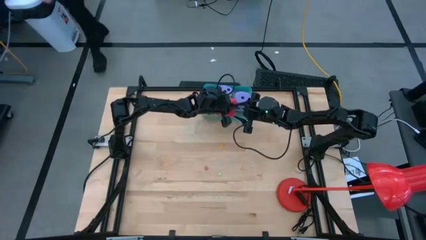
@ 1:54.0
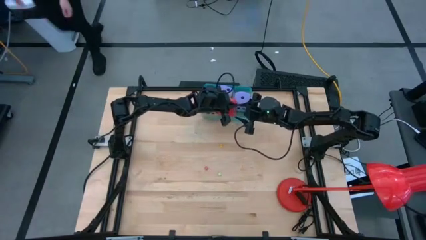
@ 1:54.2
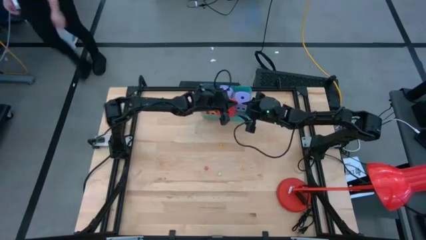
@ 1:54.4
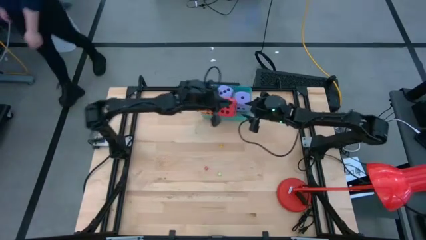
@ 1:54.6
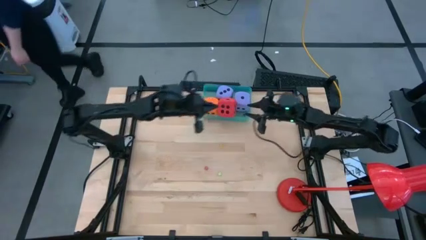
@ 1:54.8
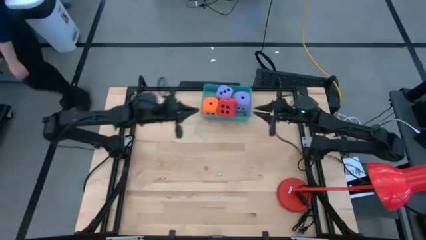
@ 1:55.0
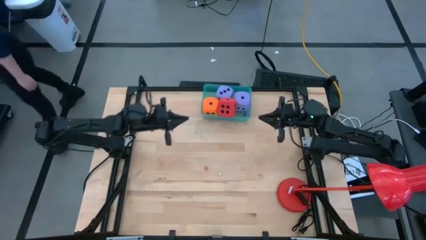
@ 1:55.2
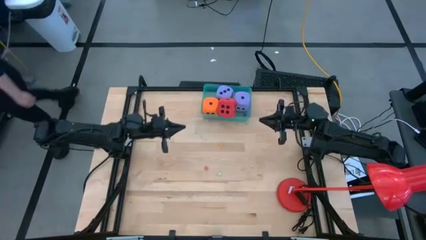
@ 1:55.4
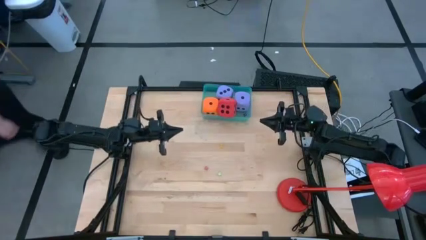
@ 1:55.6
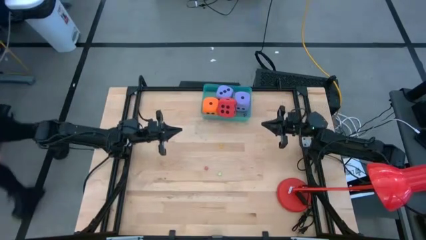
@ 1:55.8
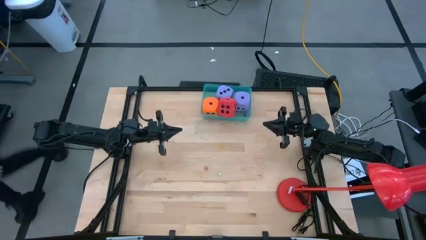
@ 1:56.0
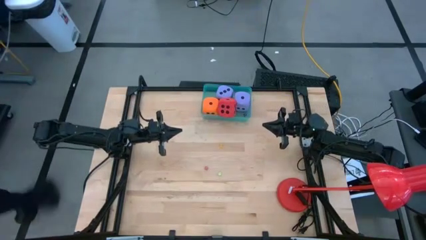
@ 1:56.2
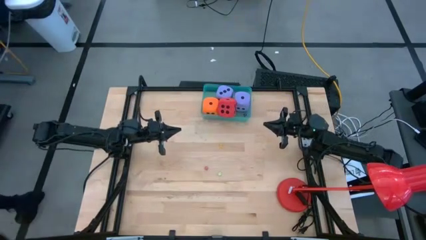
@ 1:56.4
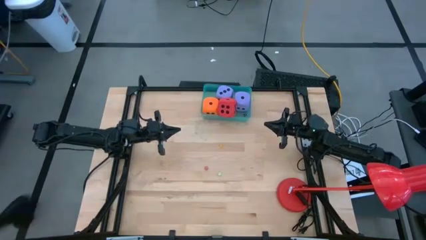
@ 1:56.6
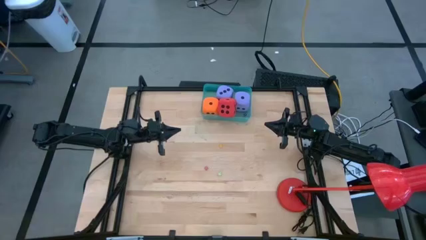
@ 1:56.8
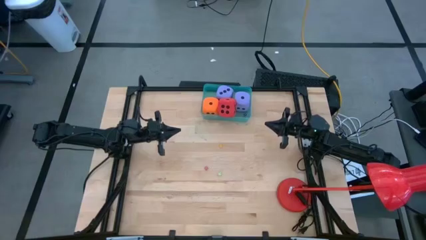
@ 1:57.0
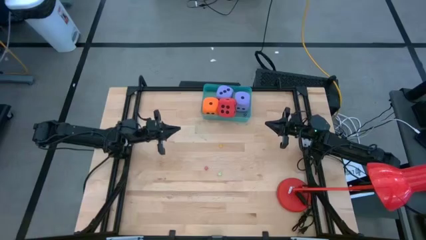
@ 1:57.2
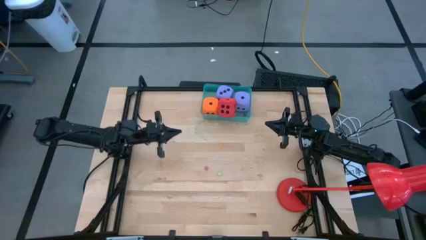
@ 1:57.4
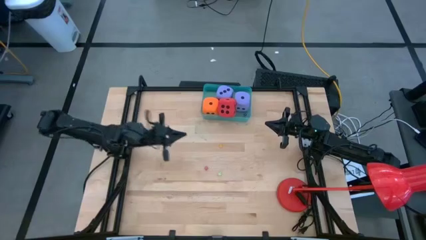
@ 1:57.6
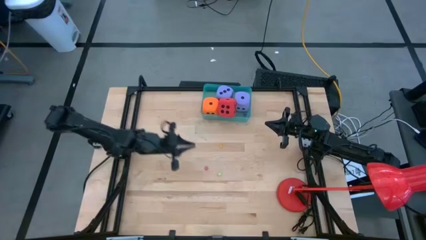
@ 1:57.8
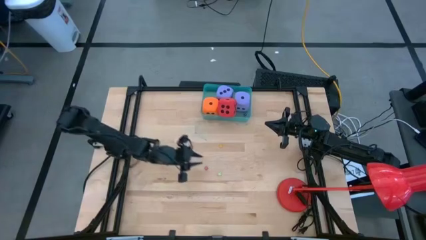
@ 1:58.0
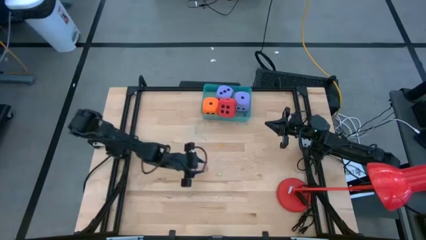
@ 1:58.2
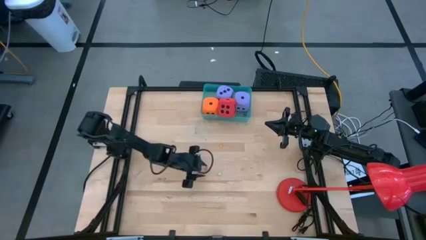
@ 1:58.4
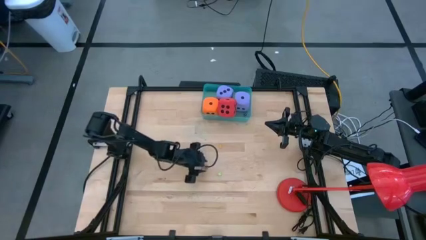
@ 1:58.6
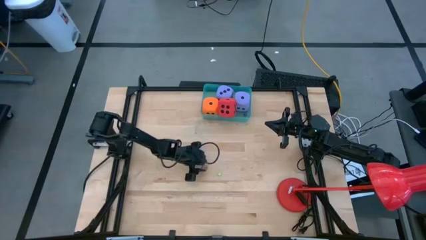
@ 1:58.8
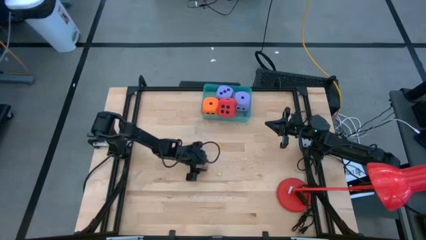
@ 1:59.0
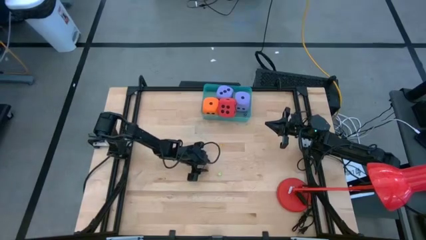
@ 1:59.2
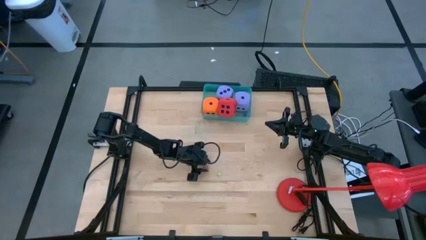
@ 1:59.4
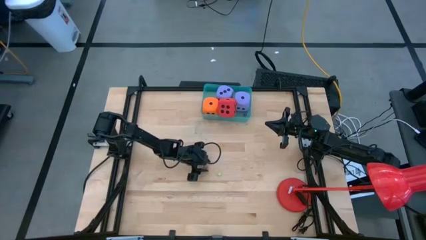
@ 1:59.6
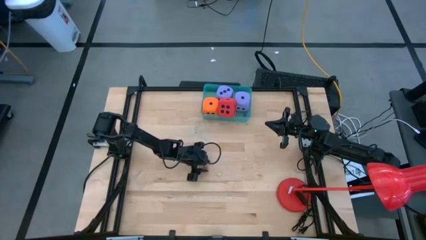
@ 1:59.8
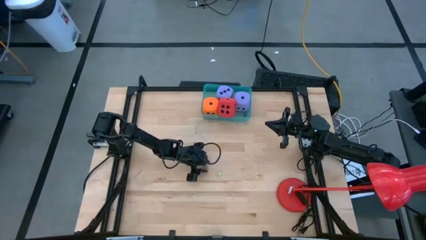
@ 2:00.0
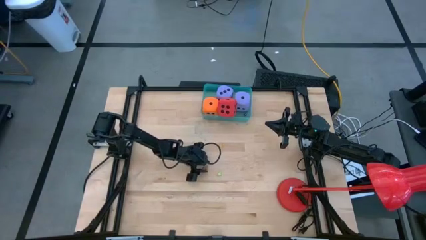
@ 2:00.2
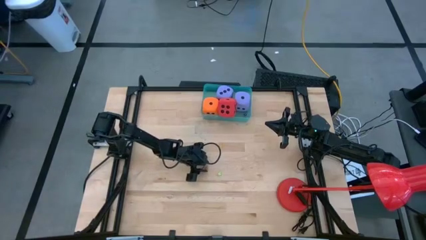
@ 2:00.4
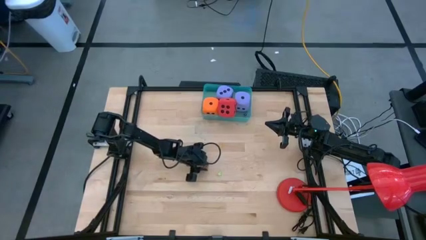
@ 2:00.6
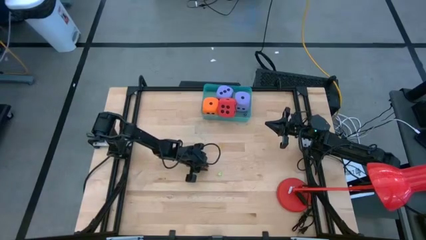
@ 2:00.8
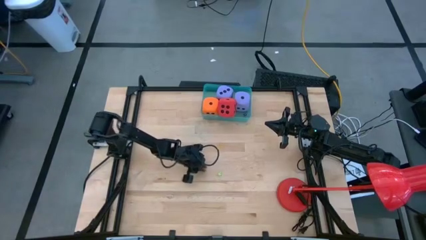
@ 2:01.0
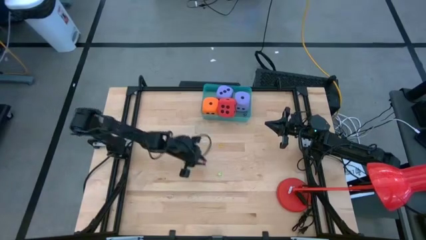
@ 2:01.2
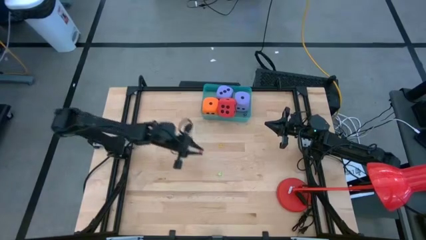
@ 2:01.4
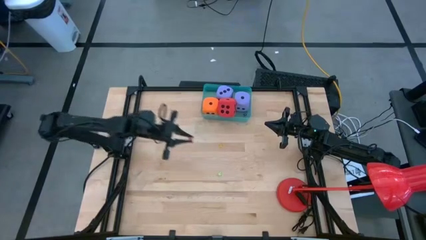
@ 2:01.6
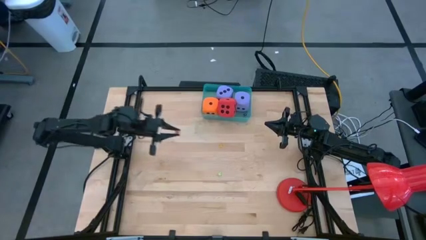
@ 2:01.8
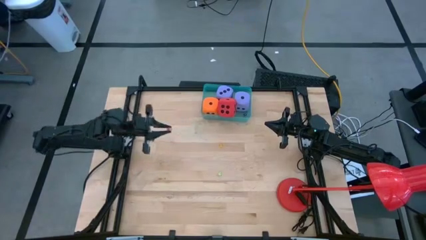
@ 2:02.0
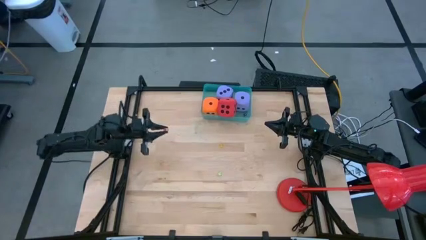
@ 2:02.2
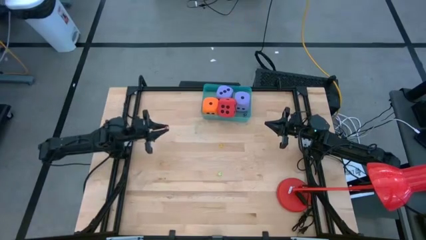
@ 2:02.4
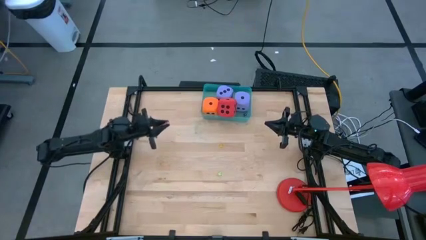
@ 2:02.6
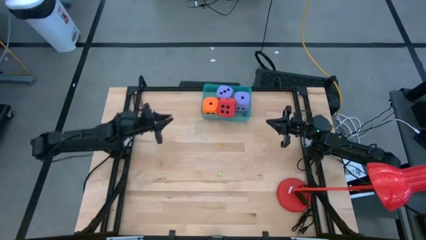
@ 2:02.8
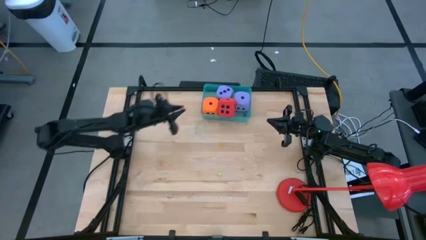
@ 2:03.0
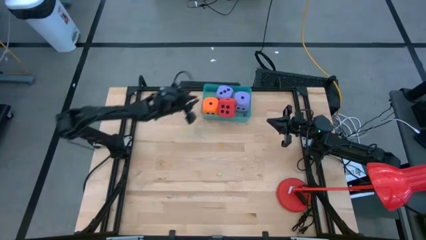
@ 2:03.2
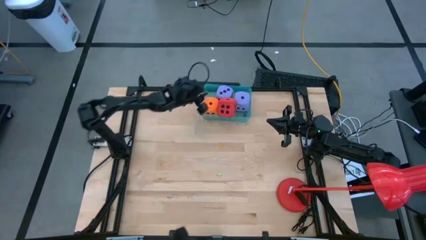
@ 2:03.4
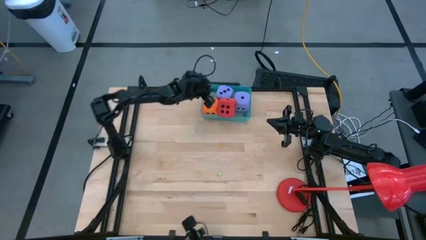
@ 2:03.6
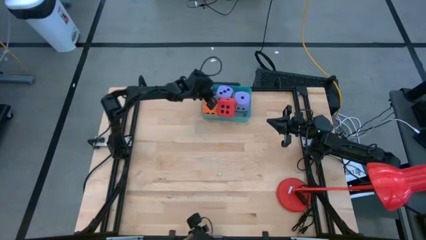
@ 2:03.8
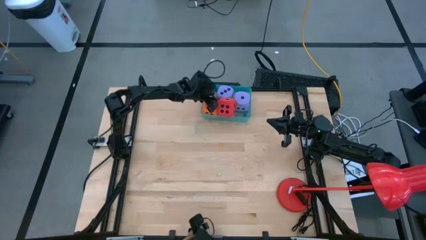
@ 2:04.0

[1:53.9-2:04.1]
Task: Pick & Place Dice
Put the small red dice into the blue transparent bin

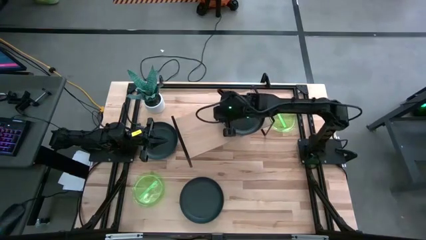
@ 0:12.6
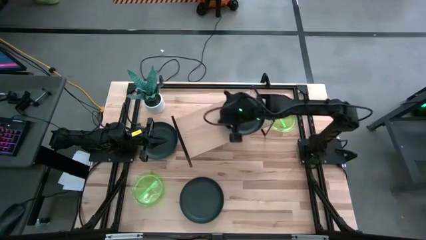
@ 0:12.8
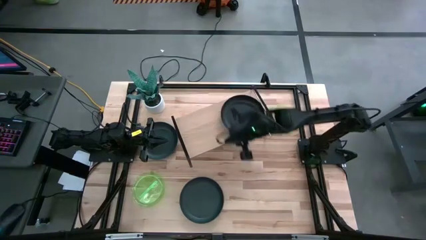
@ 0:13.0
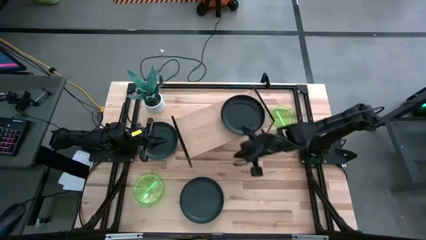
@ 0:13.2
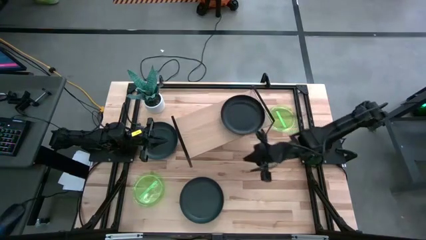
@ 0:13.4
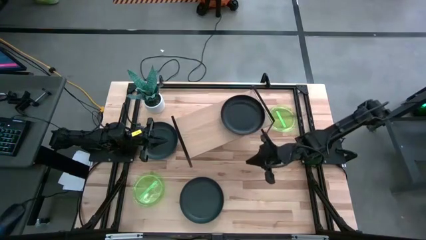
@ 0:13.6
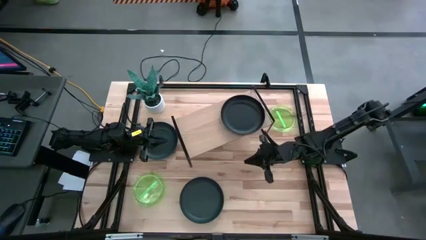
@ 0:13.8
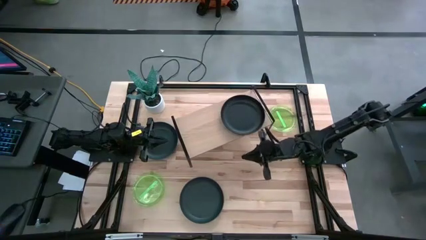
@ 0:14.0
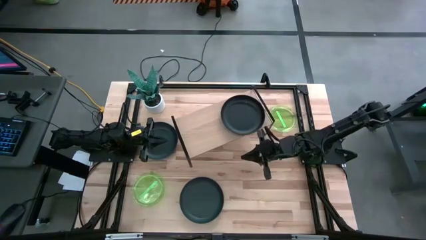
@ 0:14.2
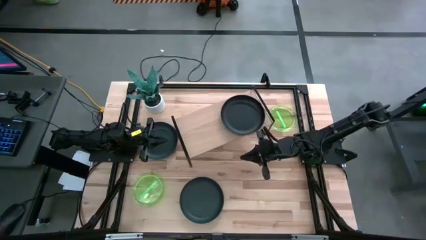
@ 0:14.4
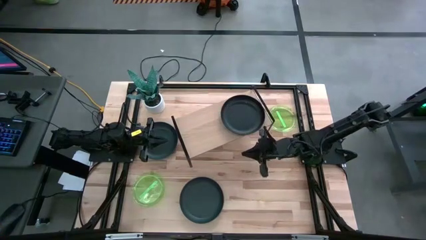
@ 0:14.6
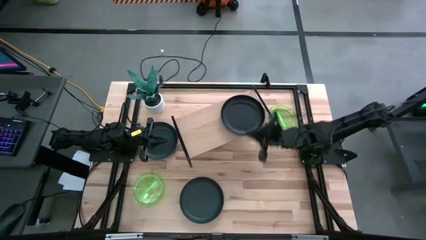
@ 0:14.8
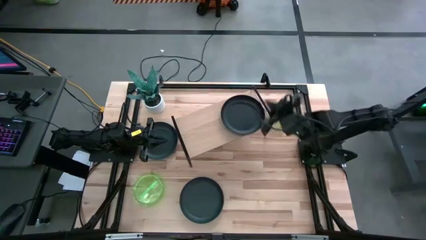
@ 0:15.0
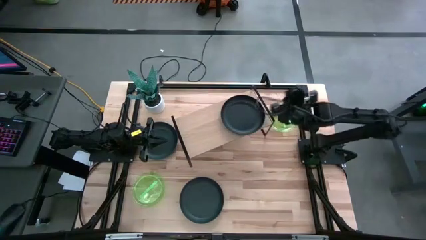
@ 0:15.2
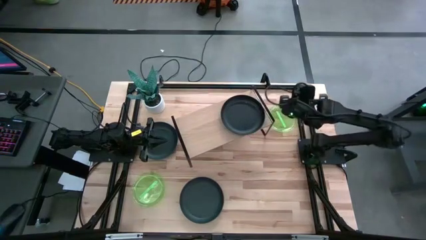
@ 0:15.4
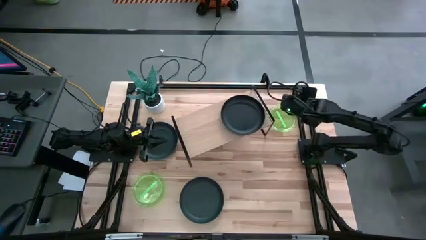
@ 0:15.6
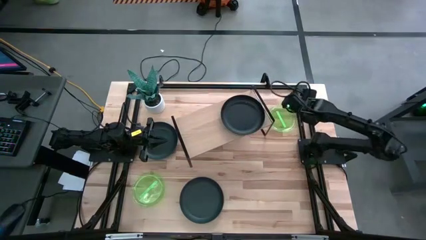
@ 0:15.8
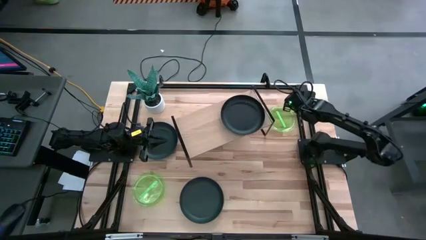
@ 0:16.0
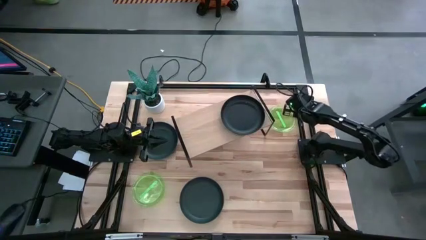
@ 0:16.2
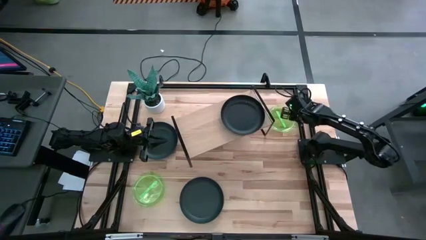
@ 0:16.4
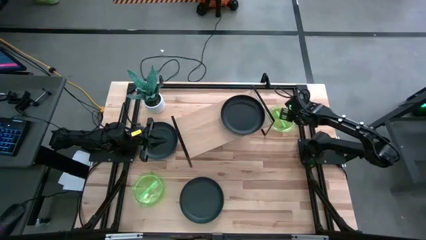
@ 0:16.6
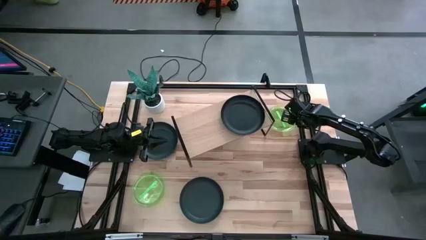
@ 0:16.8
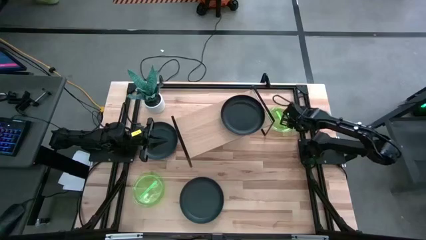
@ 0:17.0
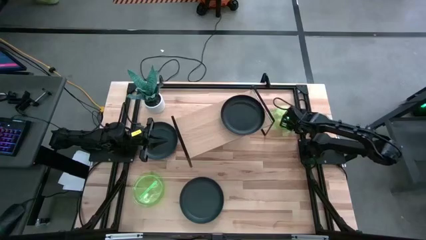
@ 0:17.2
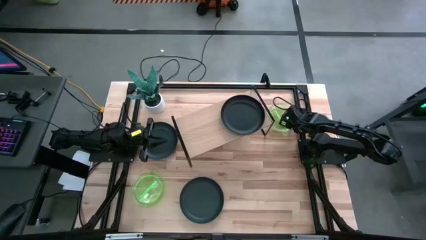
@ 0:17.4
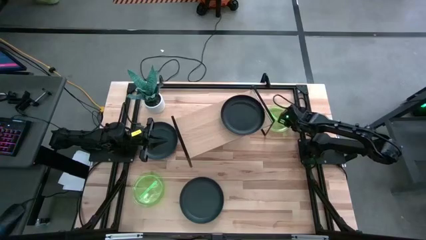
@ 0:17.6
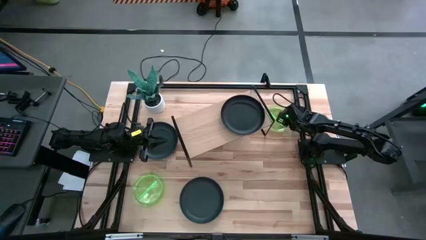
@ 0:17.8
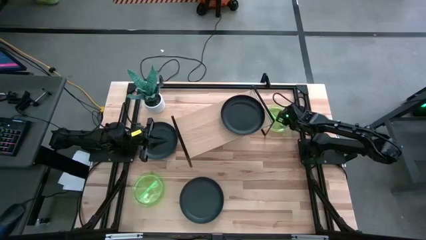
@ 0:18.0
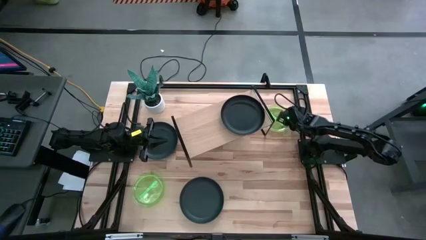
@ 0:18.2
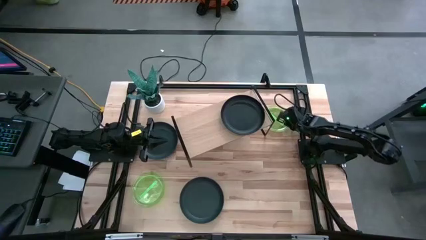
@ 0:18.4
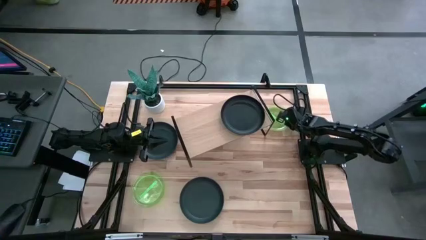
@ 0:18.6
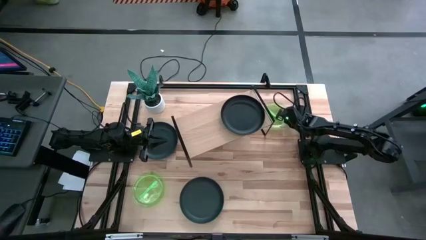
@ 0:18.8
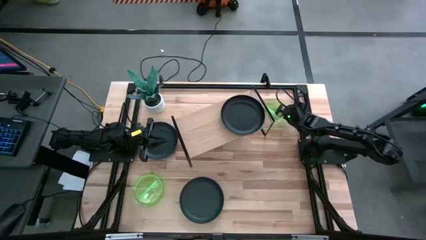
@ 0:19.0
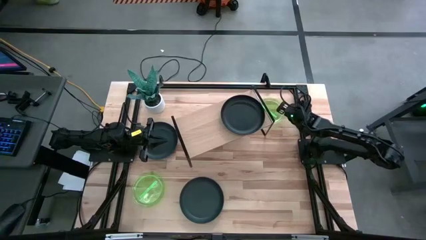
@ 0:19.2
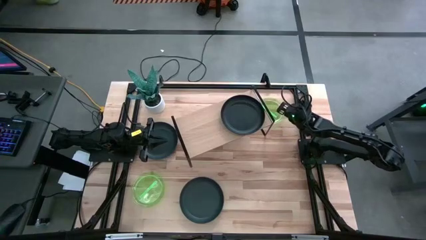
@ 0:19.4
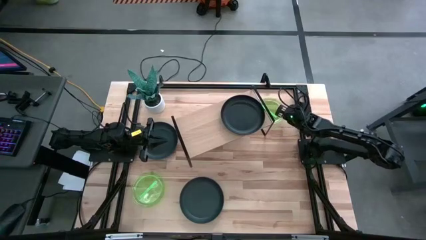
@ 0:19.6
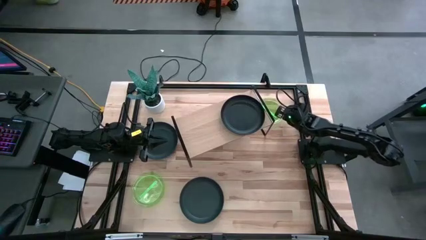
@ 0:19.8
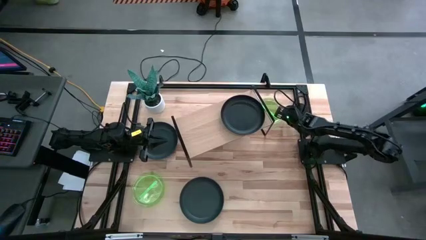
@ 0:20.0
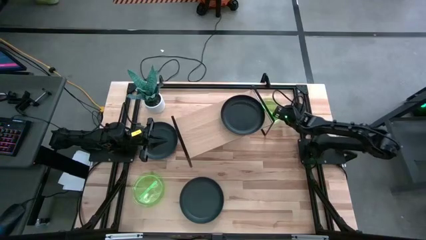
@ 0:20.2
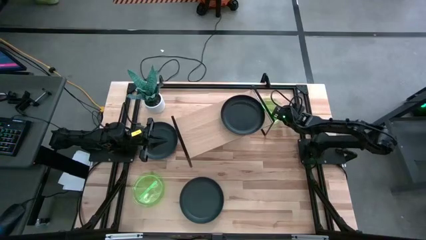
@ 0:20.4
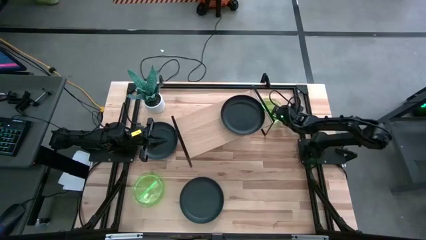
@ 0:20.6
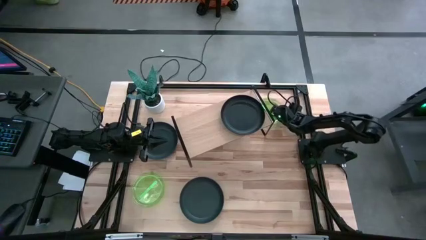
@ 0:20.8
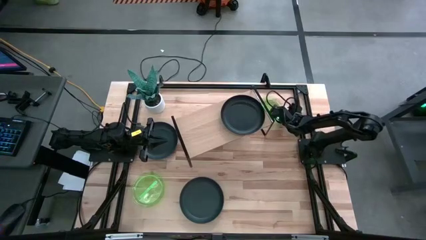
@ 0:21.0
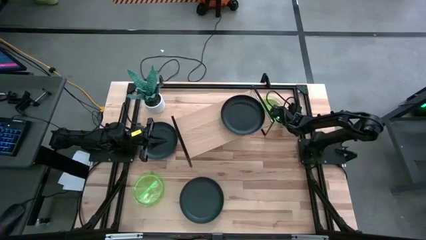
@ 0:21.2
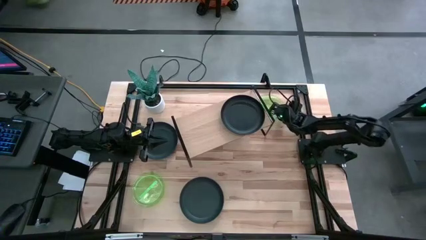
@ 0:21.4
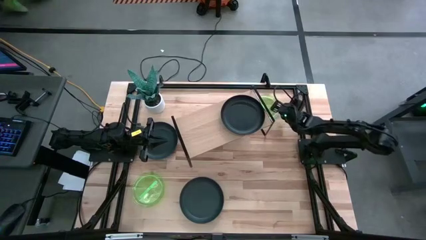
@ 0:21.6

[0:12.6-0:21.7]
Task: Place and stack plates onto a shelf
Put the top right green plate on the shelf
